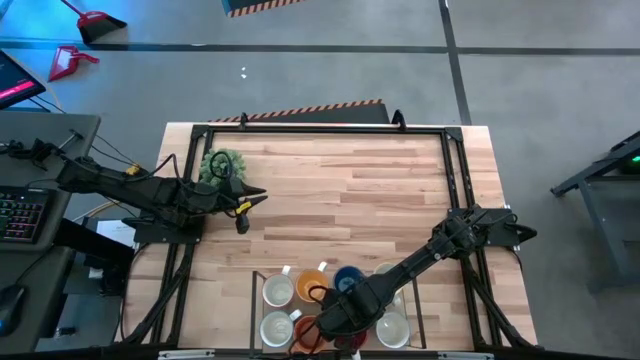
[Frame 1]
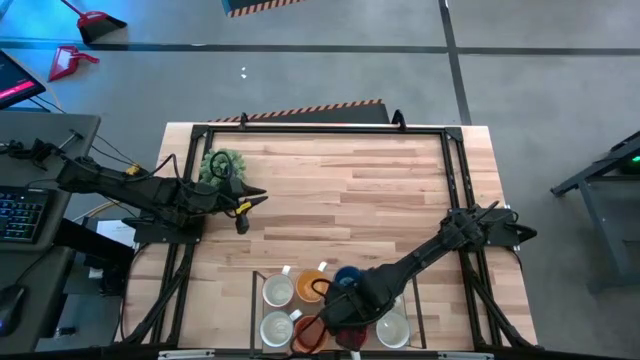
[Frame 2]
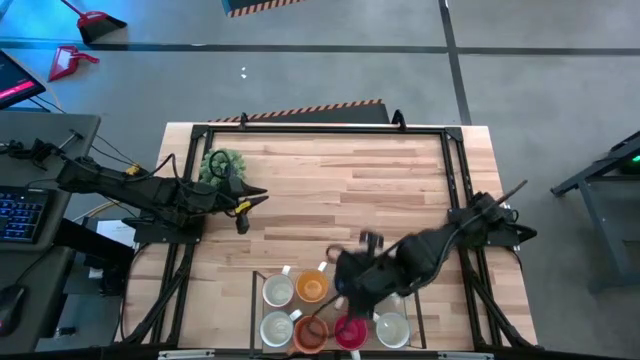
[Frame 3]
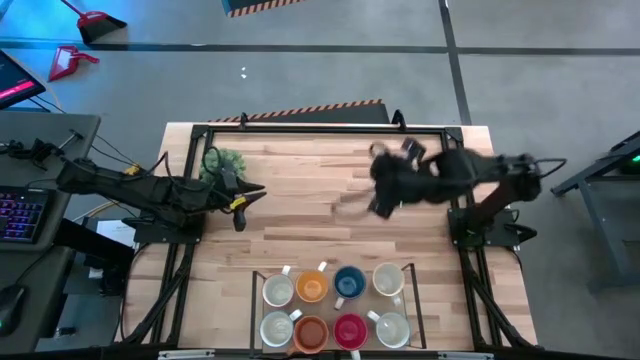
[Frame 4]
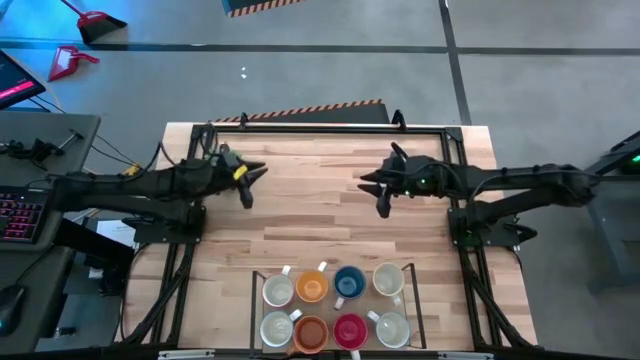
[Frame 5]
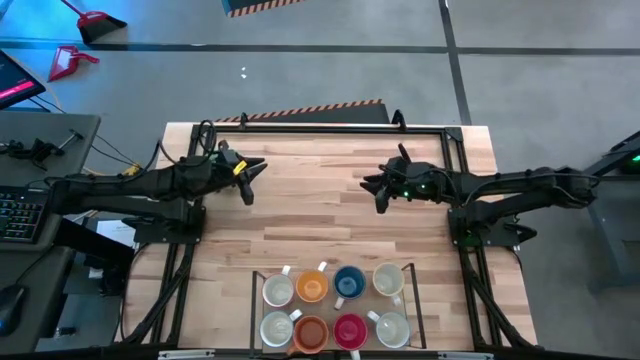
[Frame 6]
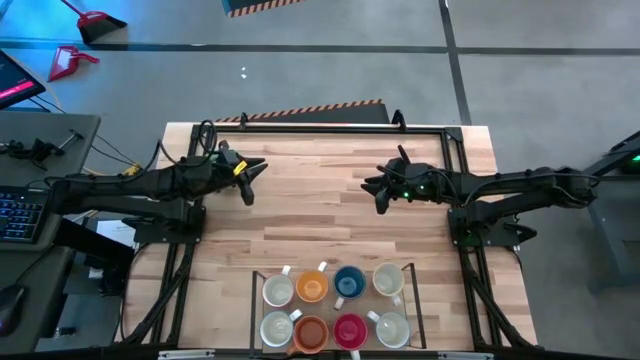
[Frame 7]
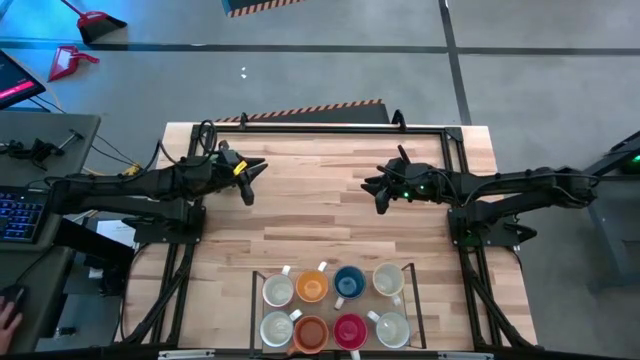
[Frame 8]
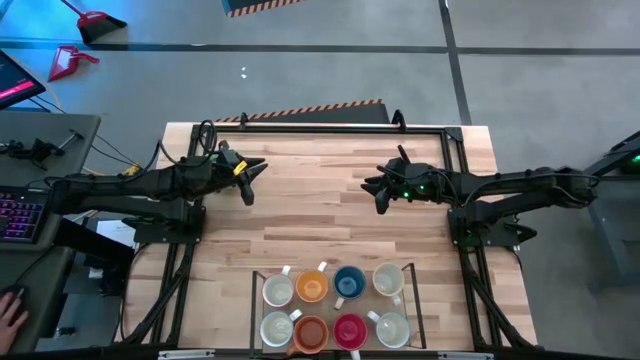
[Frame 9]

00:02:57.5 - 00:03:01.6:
Task: Place coffee mugs
Return to Home Position

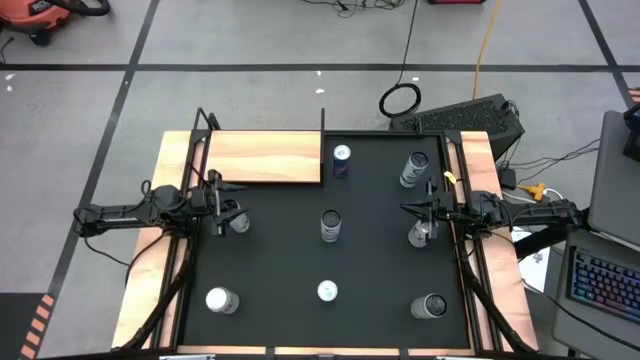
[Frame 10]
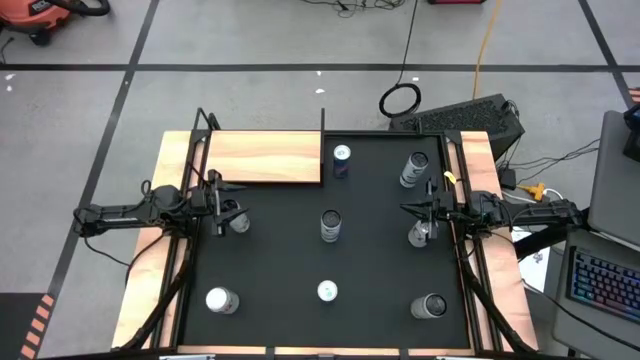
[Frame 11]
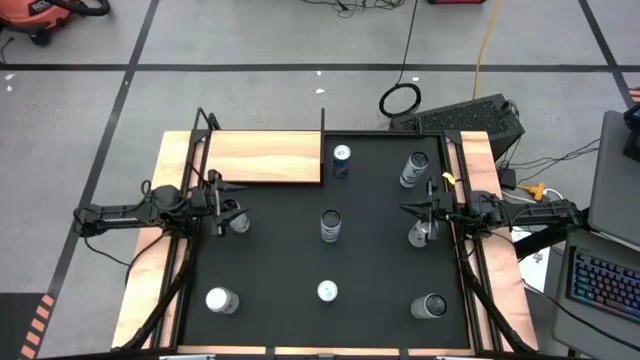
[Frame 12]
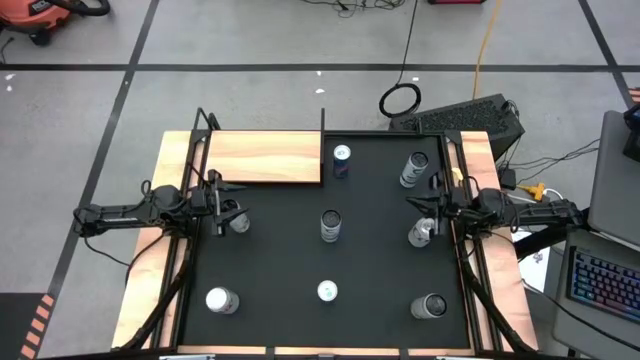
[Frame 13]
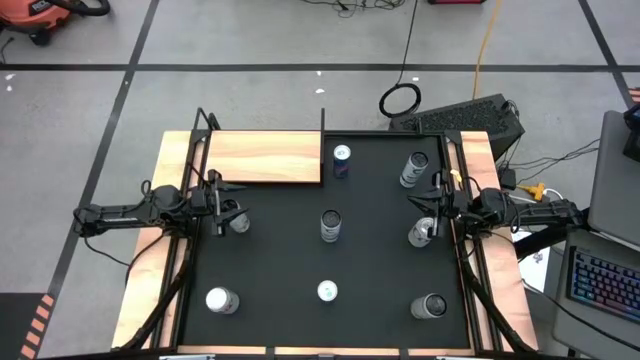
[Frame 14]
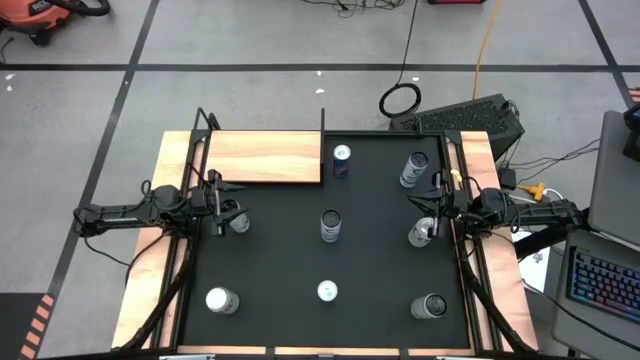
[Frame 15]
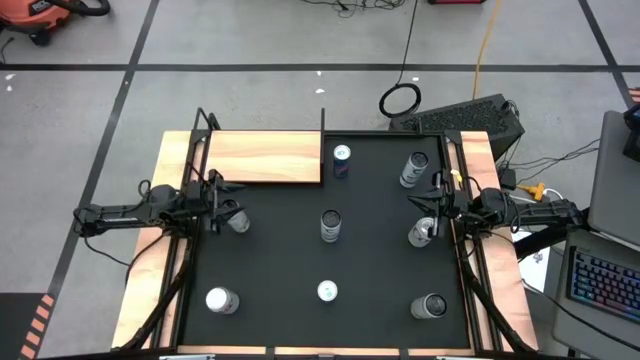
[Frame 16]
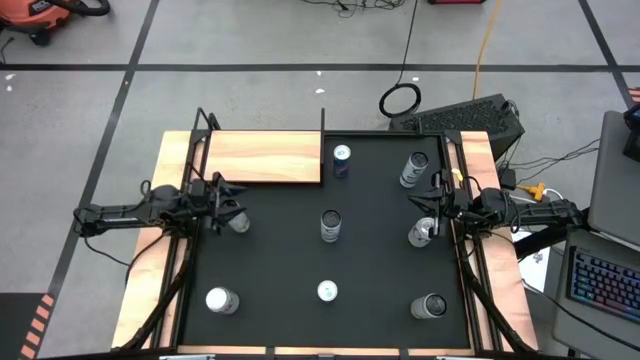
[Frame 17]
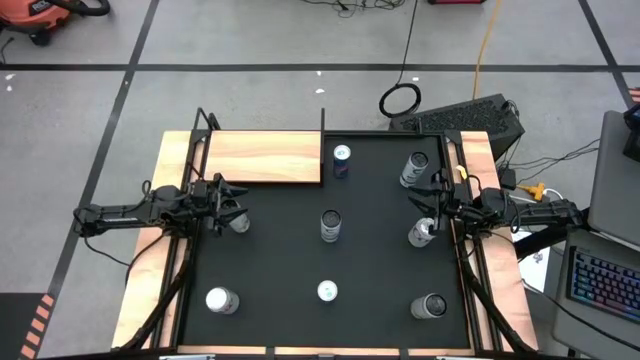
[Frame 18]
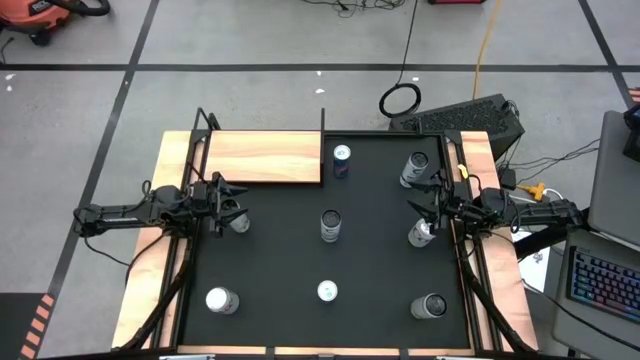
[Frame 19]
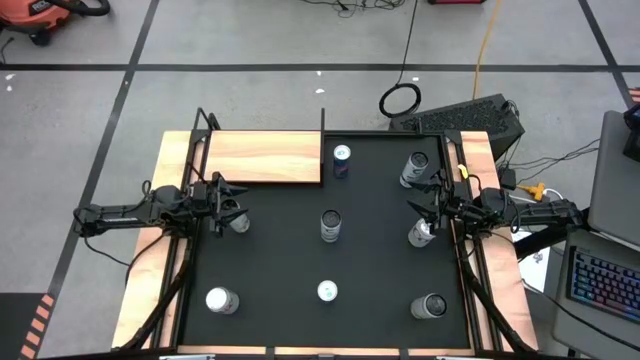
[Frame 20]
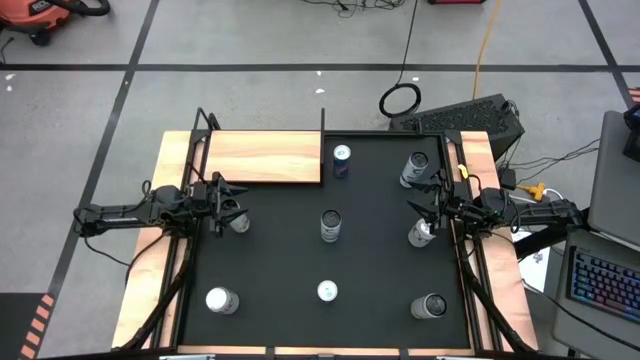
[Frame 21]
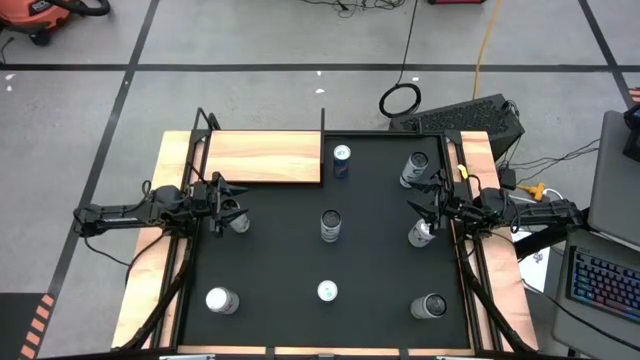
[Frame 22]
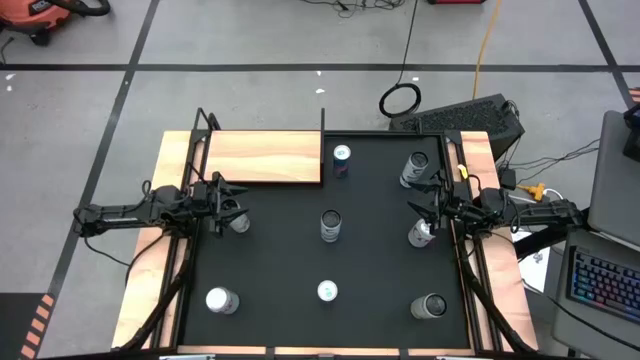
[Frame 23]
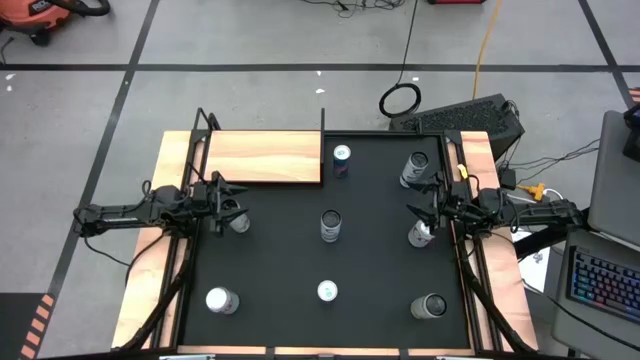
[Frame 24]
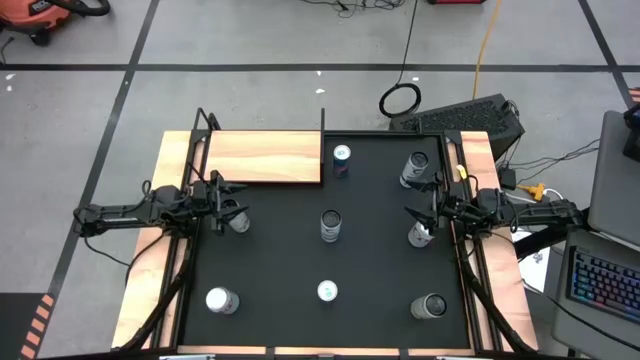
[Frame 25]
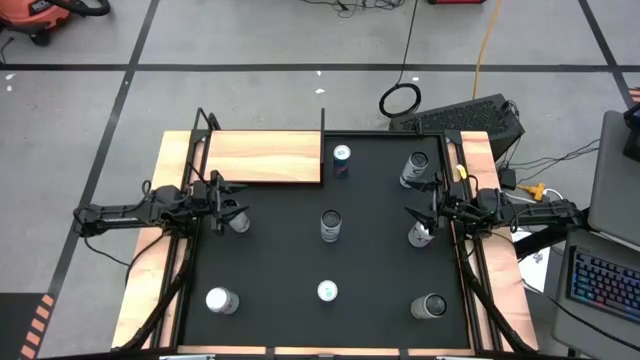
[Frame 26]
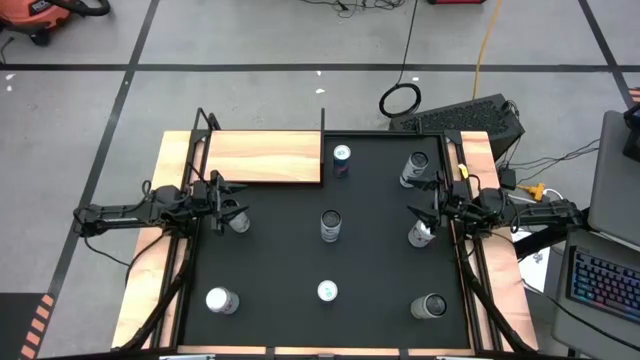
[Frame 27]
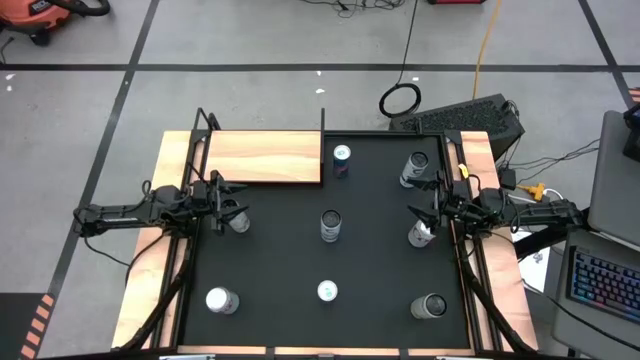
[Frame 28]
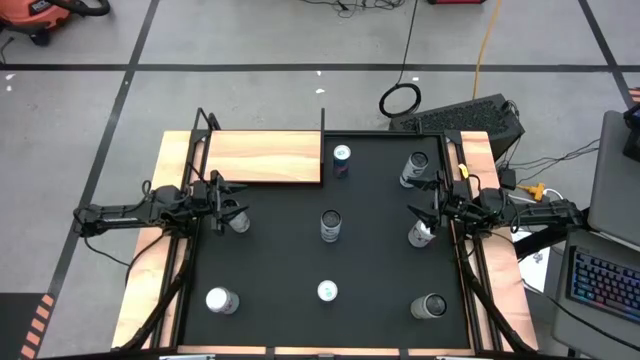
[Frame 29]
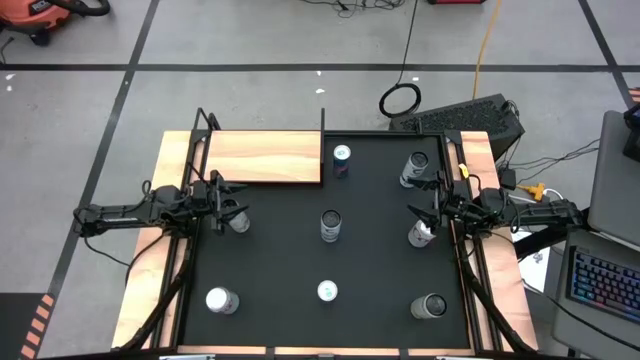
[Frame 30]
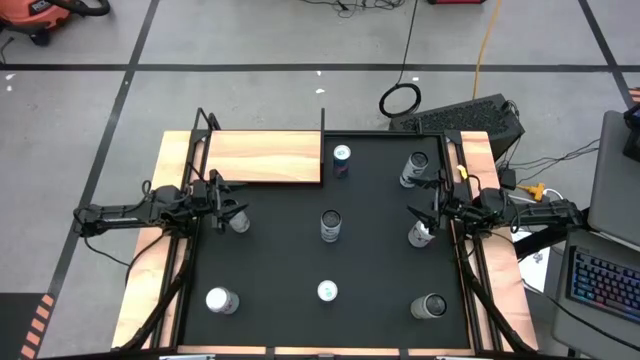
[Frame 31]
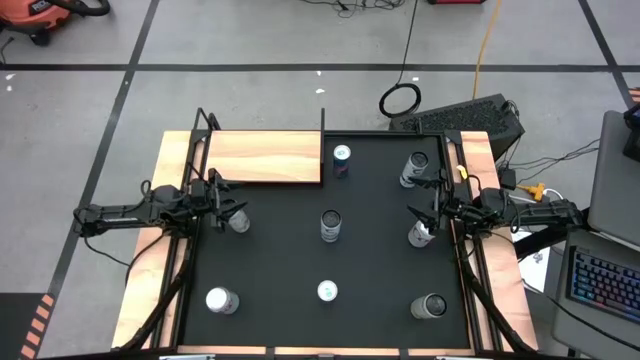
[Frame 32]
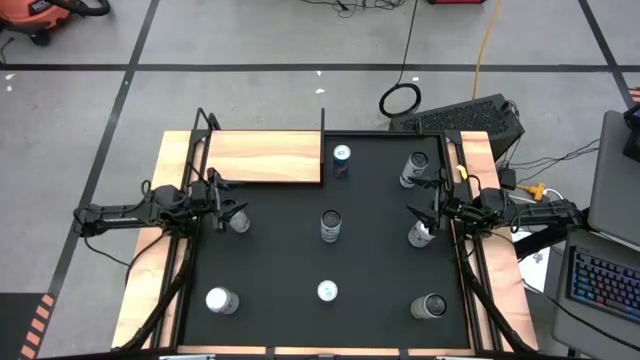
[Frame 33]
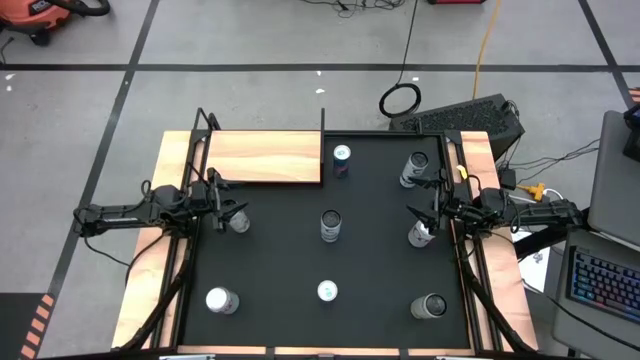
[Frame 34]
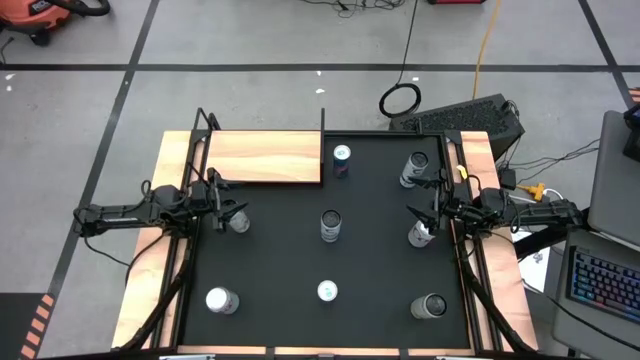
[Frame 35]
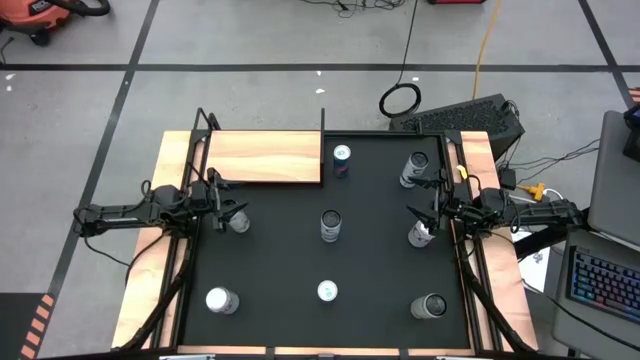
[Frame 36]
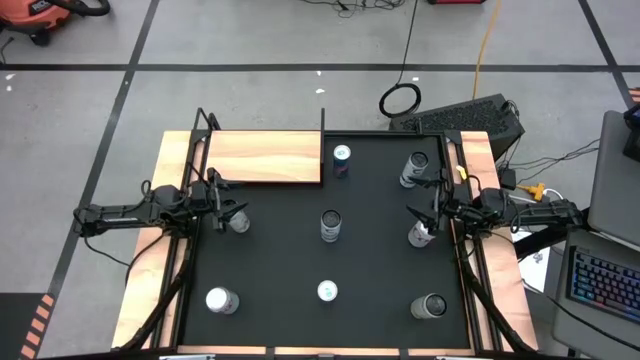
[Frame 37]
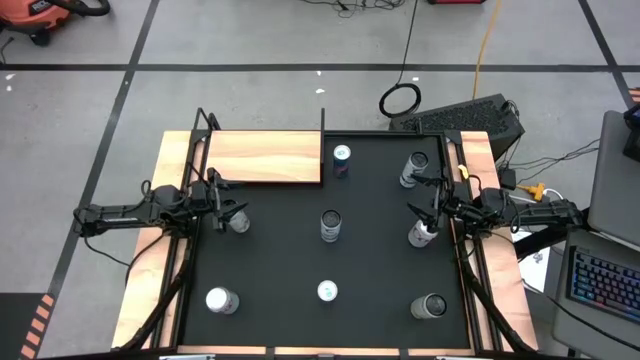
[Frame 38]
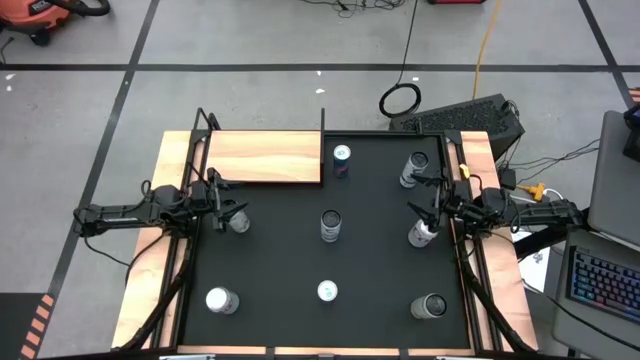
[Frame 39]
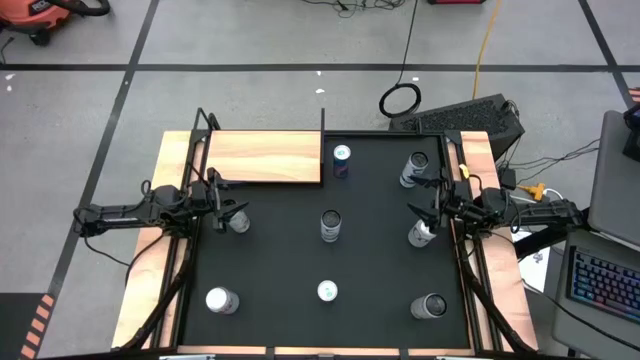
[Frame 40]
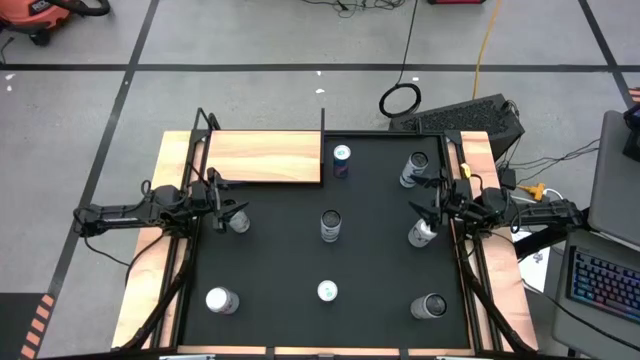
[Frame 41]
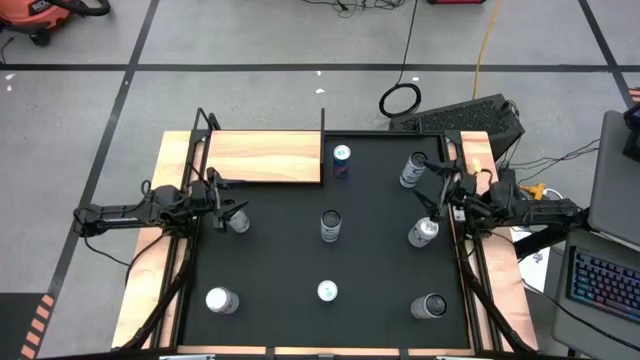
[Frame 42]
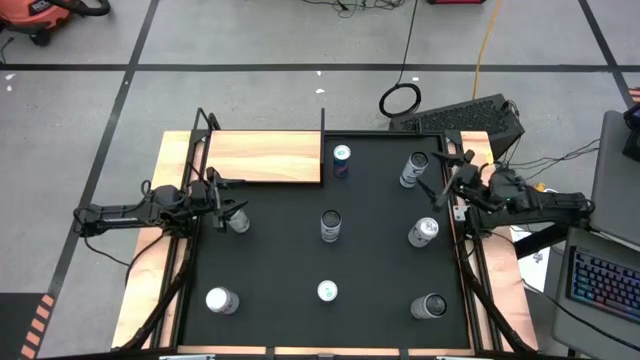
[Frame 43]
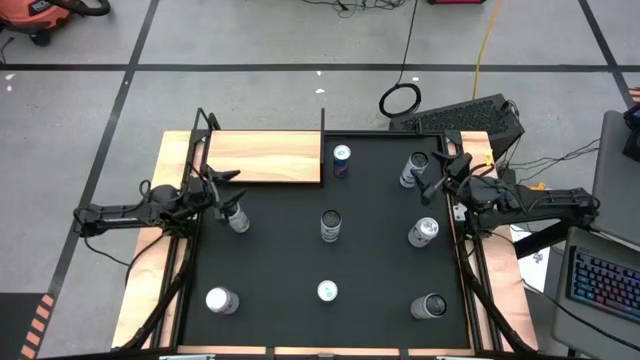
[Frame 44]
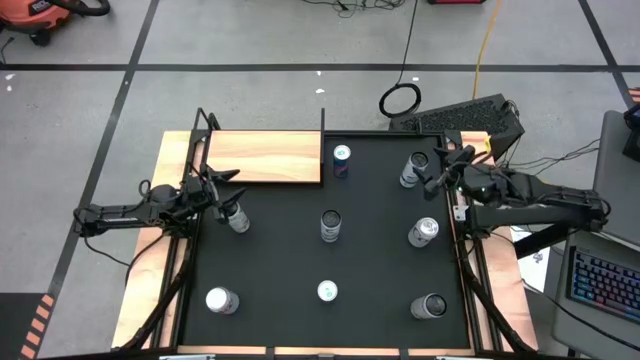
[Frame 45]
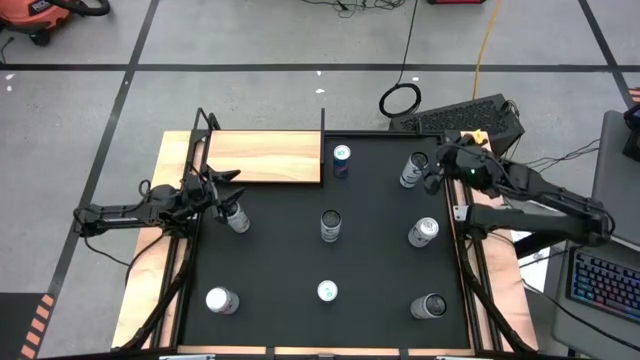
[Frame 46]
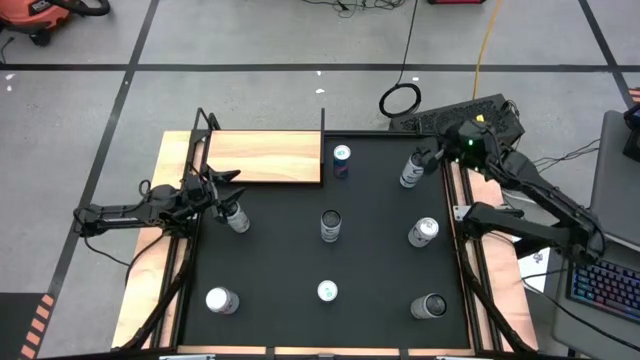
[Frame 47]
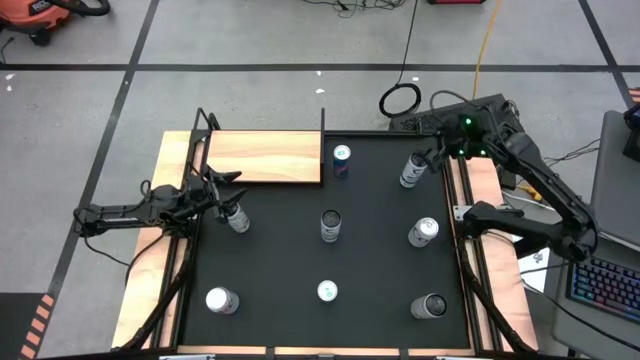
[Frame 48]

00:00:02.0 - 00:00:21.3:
Task: Place canned beverage on shelf
Put the top white-blue soda can on the shelf
